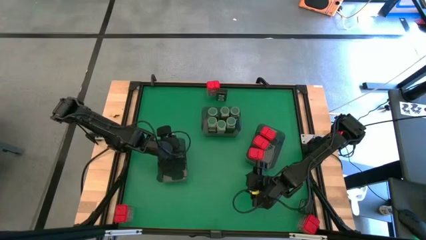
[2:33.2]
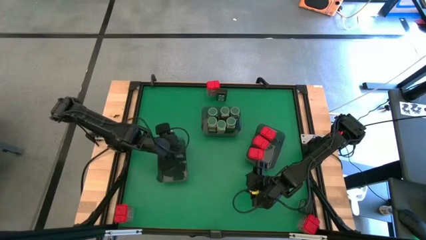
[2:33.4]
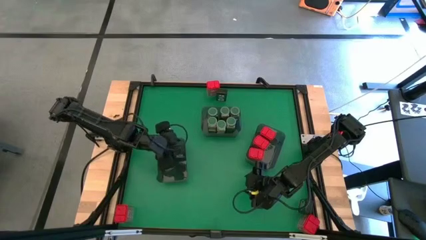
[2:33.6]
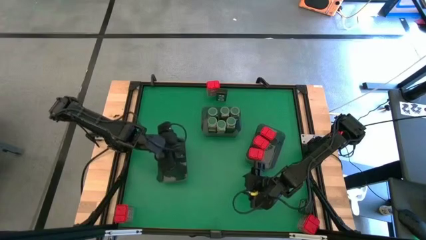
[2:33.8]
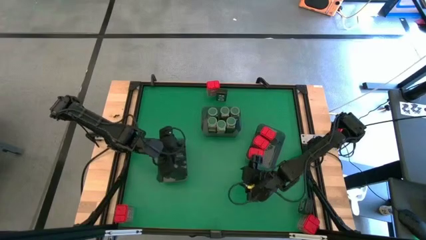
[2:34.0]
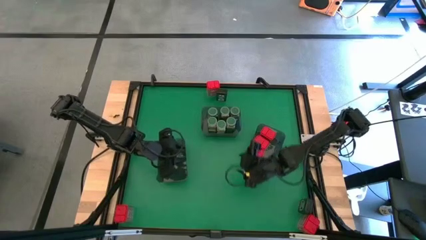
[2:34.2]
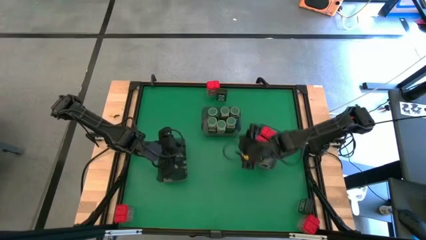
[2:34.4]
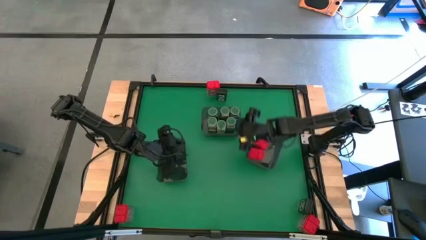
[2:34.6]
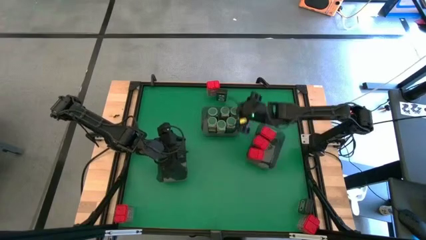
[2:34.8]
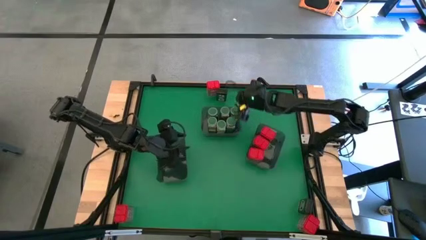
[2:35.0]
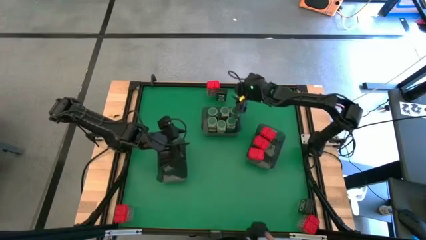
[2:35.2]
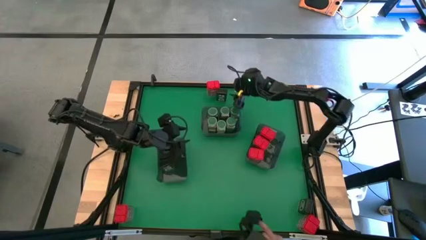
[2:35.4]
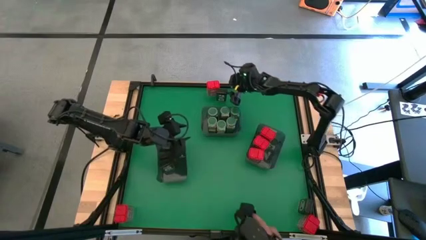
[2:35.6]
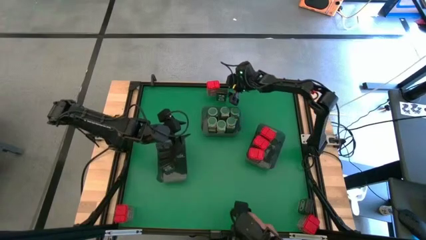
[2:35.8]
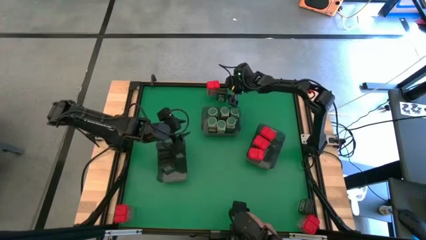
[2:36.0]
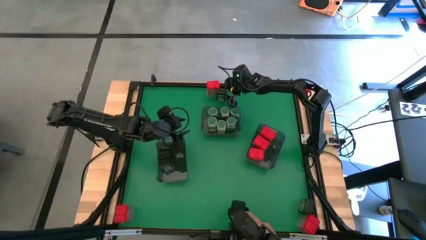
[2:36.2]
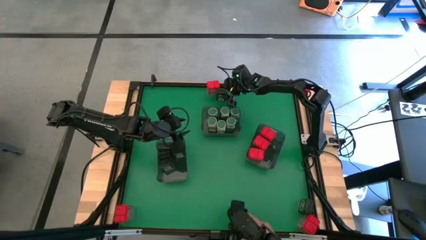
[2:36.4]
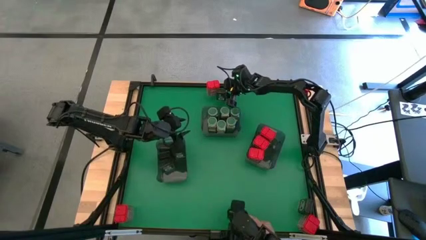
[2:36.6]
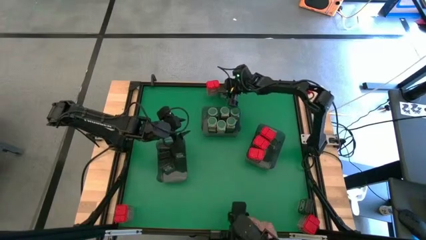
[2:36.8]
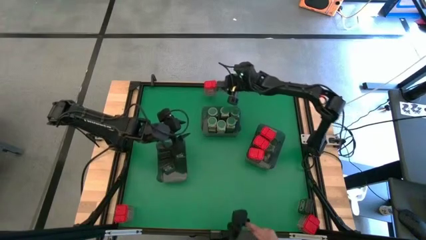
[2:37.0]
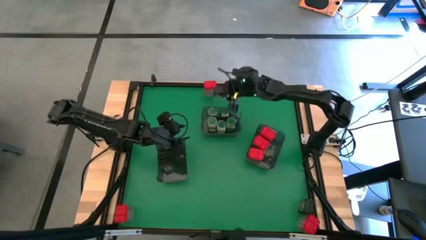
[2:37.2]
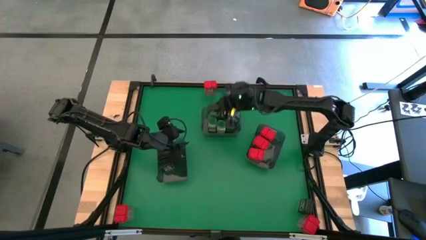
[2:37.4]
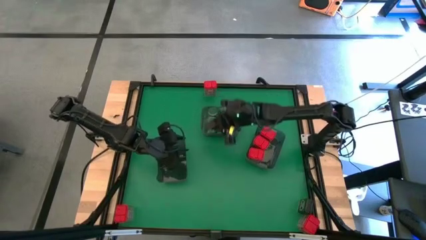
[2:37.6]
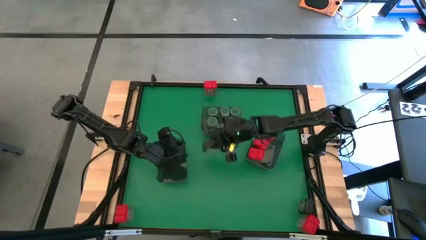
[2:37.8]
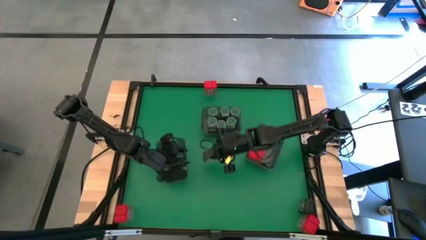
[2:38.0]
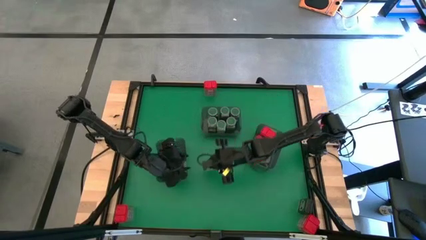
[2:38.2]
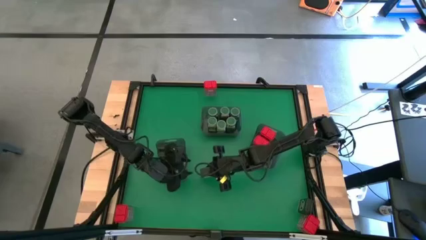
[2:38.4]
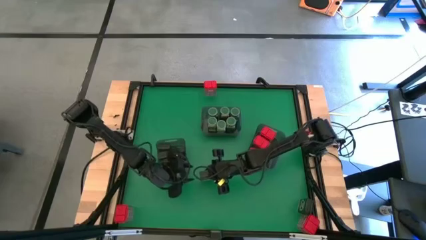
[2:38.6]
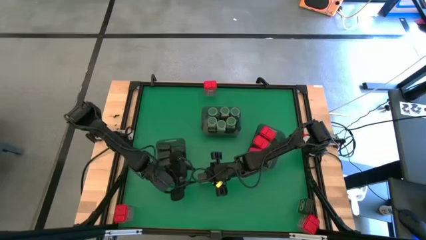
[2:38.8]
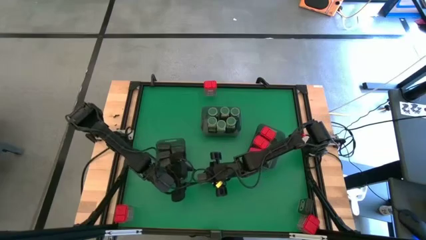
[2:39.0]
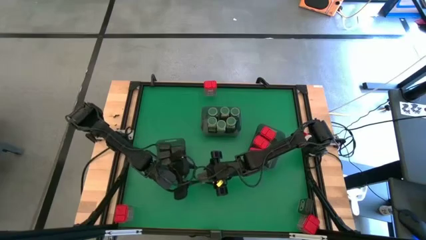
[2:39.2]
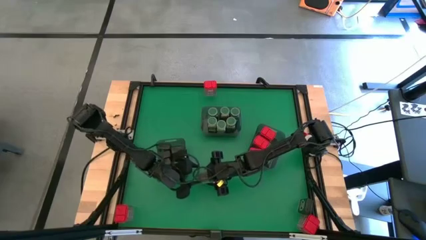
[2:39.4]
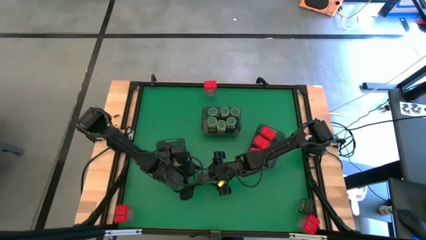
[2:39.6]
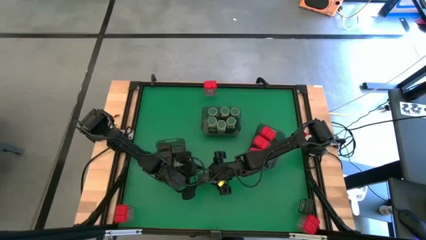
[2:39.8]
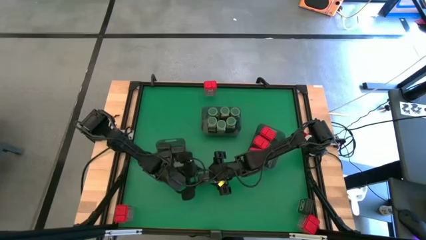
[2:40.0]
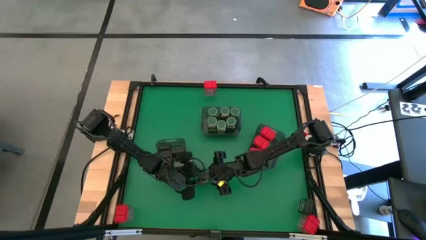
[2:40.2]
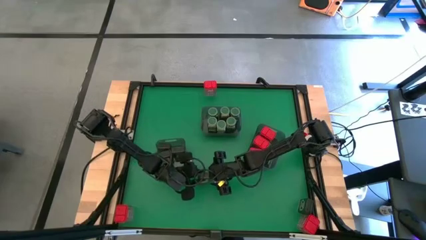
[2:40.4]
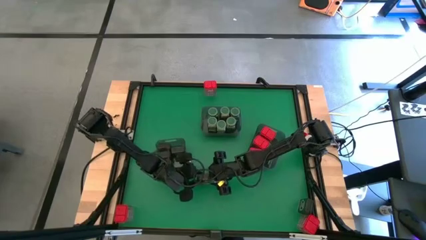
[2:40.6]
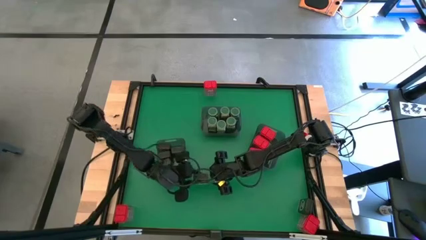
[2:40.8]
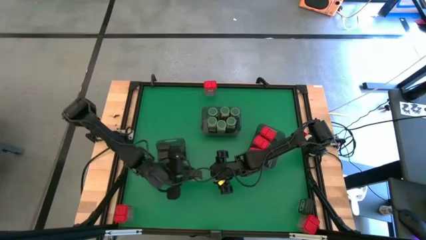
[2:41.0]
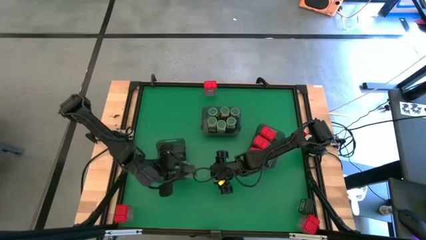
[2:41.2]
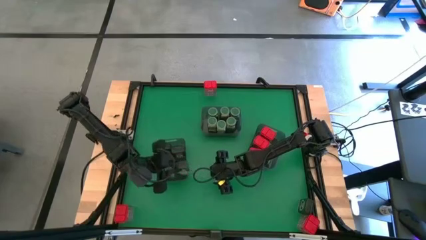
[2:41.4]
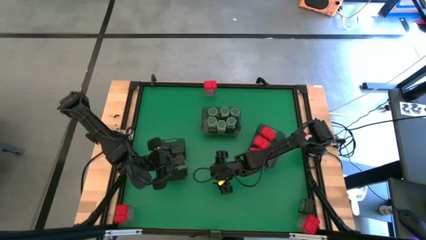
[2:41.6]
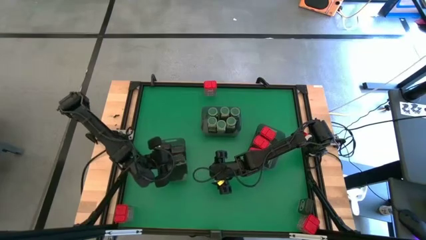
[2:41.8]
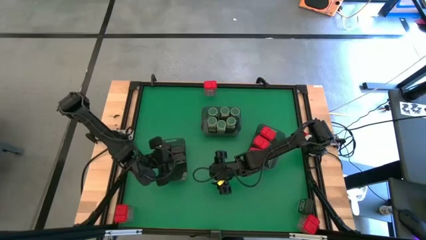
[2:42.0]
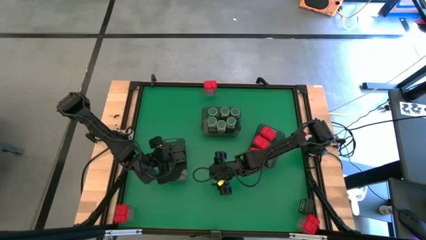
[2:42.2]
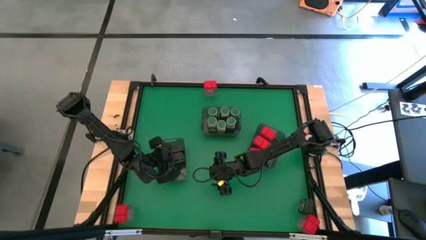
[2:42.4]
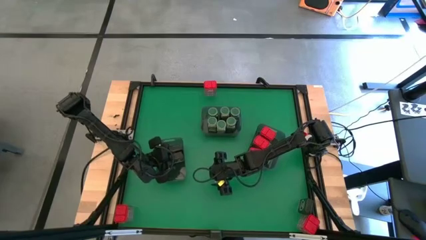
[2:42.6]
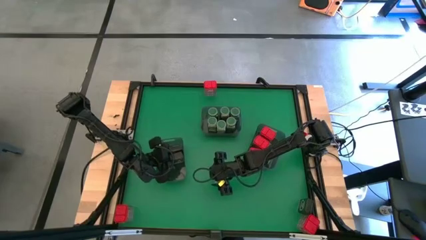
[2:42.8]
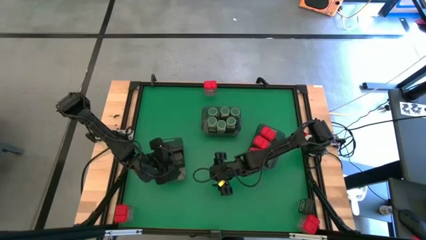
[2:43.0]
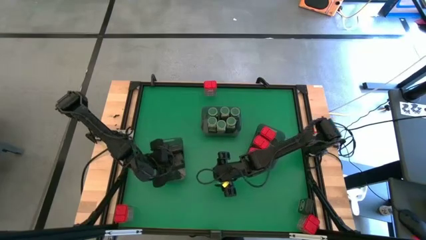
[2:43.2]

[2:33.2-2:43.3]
Task: Sort spices by type
Put the black seasoning can into the left black bin

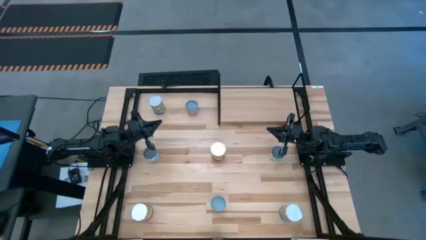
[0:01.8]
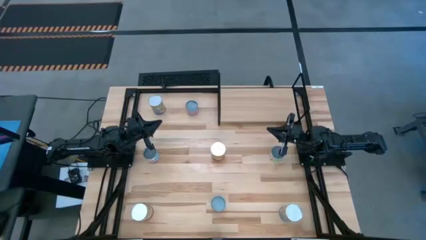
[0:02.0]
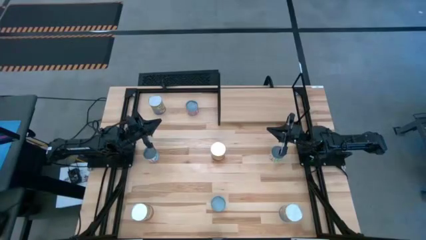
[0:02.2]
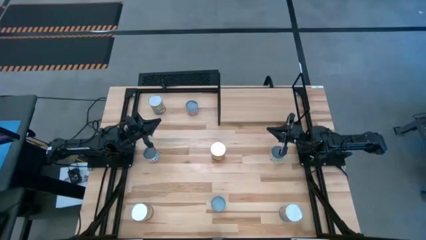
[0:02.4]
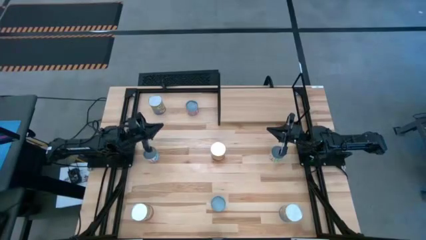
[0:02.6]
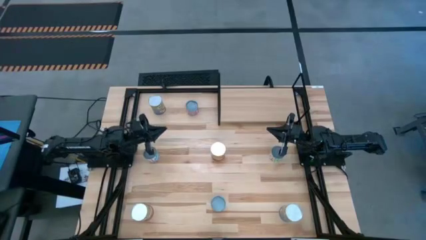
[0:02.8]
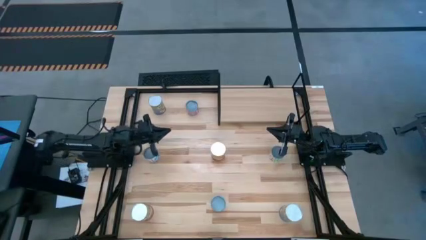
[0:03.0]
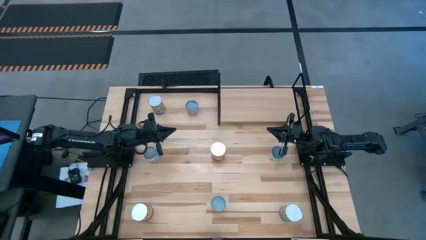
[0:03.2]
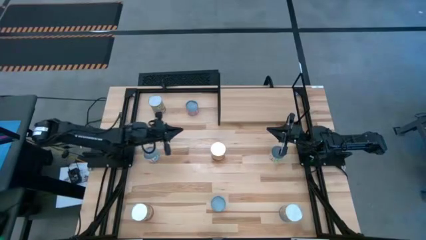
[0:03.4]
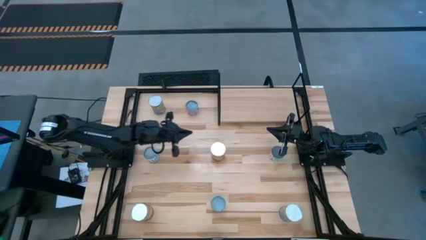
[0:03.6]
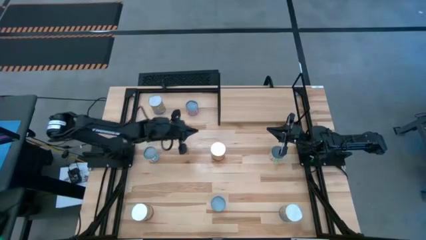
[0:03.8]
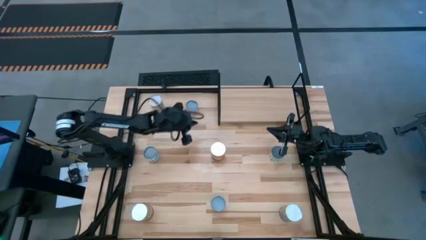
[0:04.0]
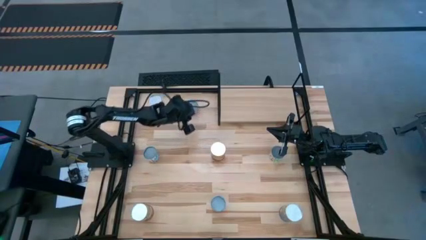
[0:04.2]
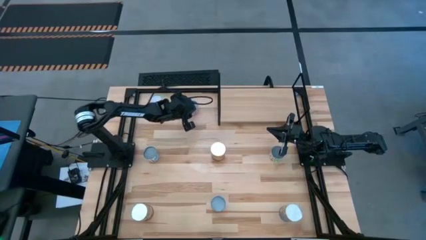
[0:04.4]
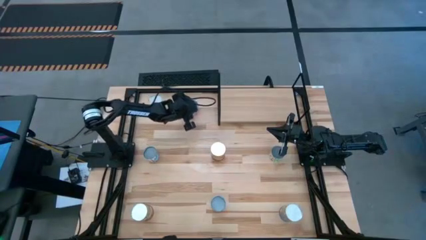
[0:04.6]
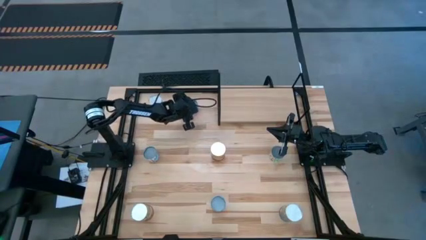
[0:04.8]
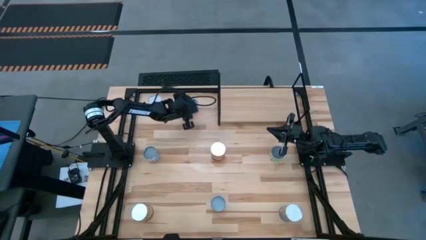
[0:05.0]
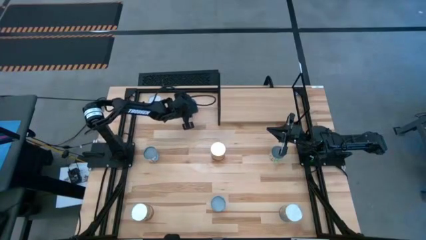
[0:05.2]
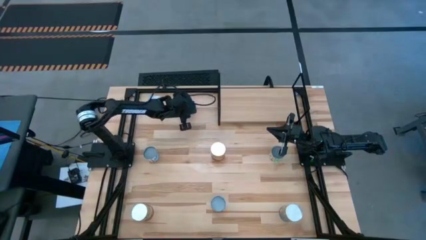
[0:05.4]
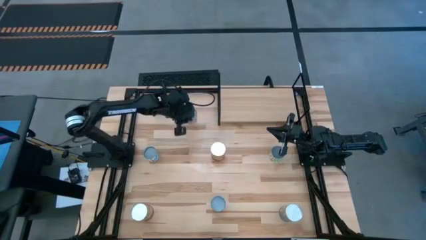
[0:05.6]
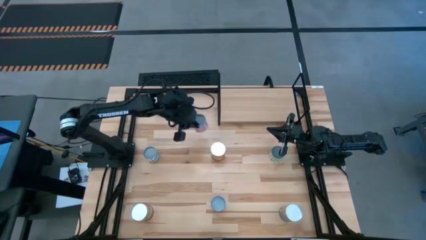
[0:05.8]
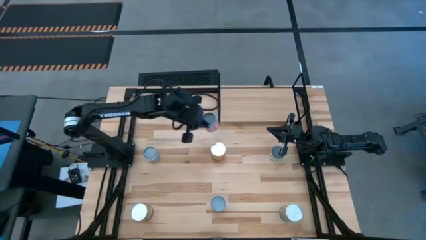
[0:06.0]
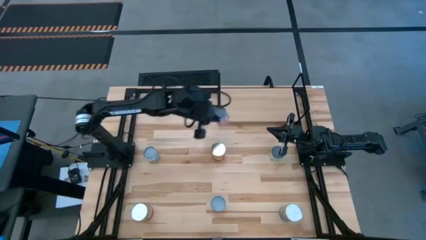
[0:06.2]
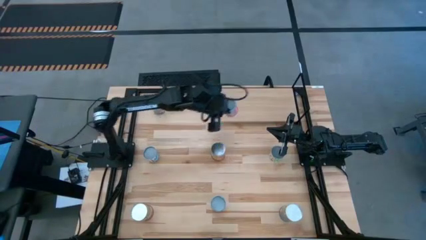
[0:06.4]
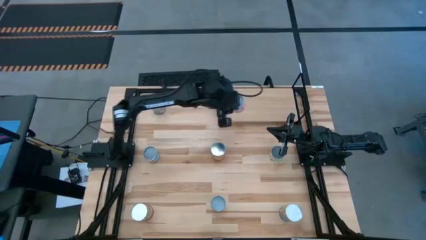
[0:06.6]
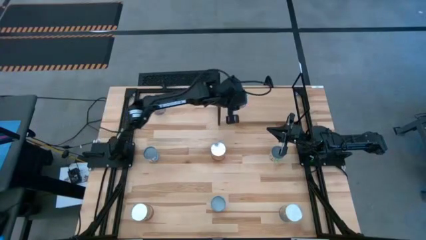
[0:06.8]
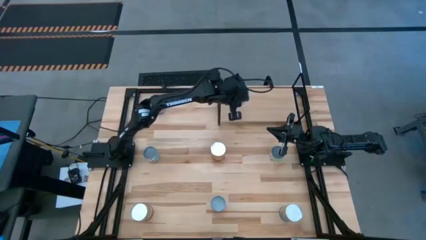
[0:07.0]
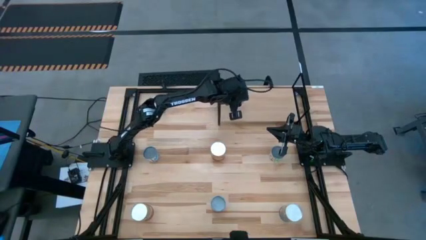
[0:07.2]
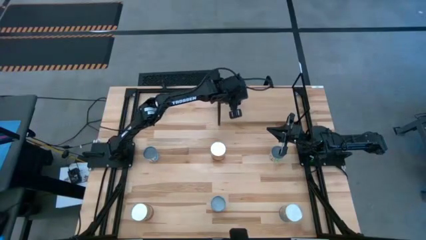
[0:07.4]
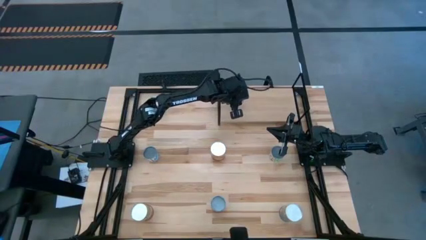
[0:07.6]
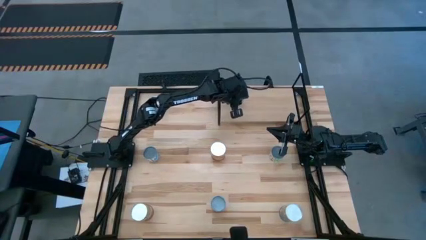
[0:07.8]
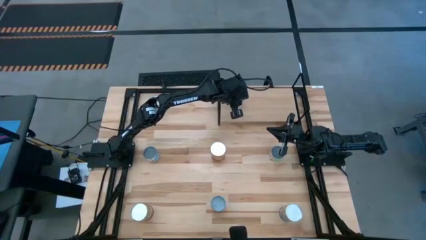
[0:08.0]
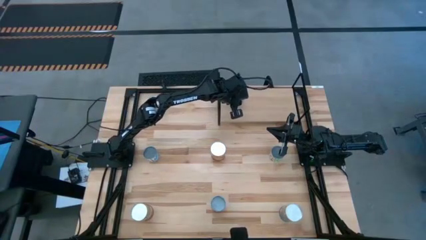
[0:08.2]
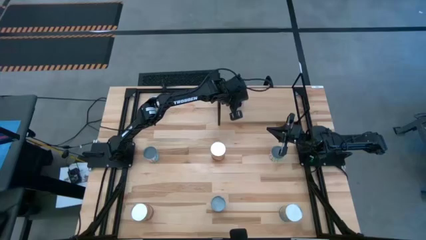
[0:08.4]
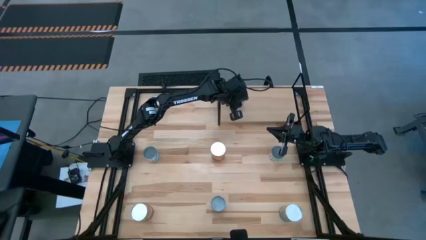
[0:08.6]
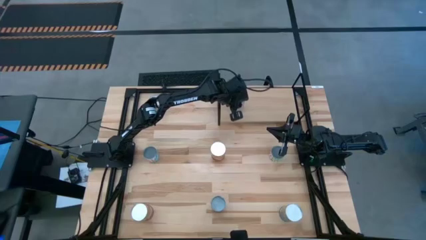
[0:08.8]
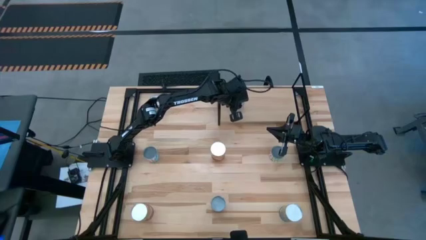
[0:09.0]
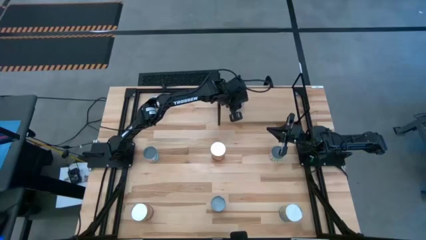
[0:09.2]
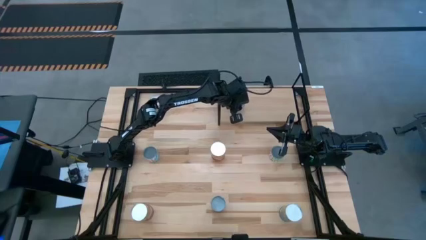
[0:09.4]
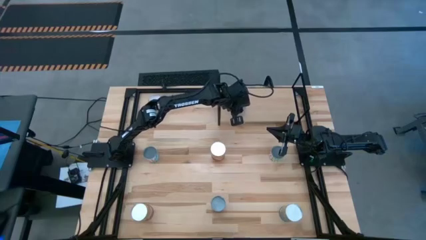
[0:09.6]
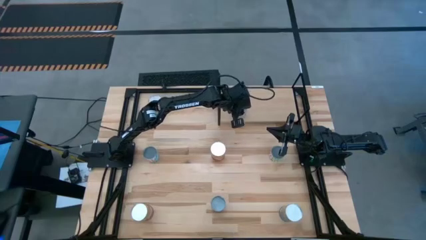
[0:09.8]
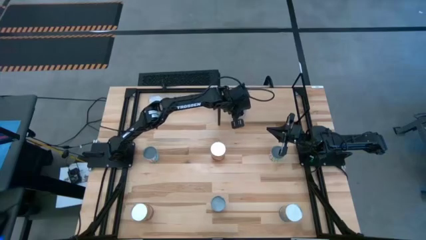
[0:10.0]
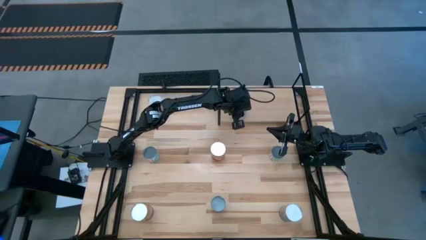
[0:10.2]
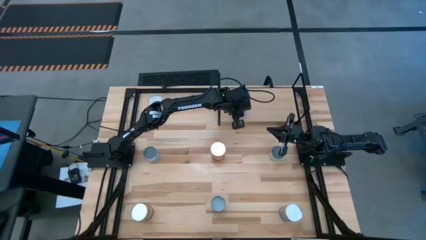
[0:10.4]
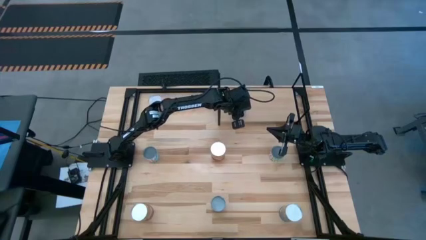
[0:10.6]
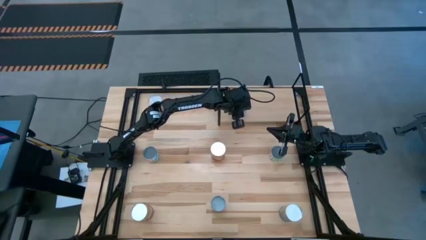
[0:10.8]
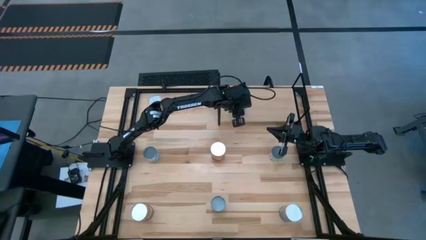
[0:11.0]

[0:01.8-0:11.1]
Task: Pick and place cans onto a shelf
Put the small canned corn on the shelf
